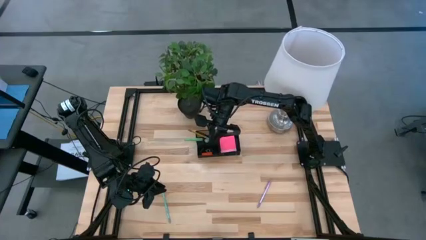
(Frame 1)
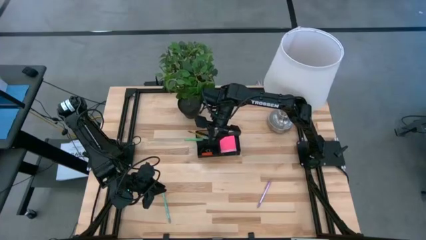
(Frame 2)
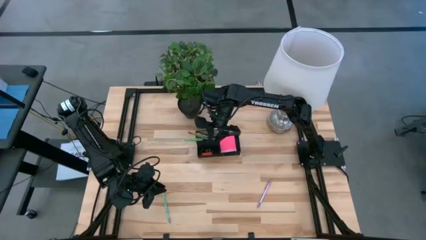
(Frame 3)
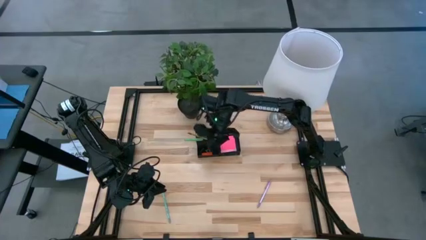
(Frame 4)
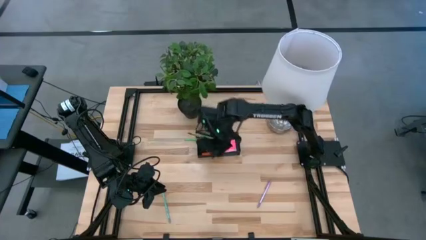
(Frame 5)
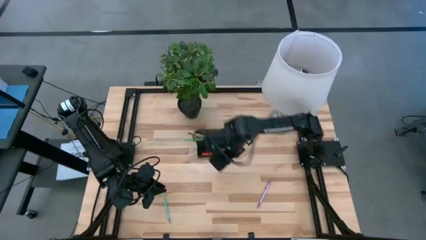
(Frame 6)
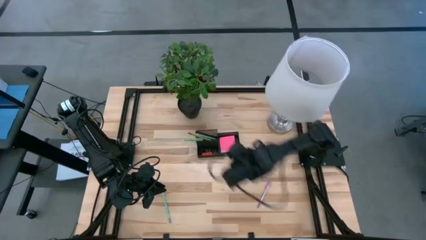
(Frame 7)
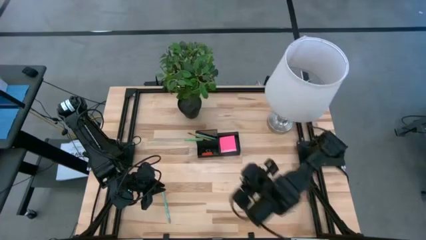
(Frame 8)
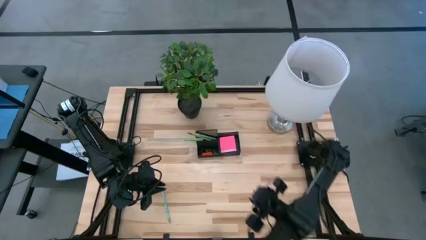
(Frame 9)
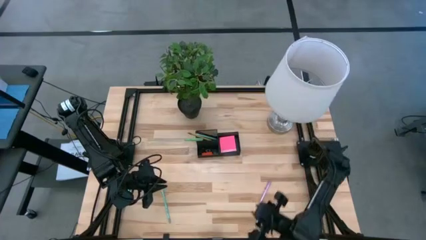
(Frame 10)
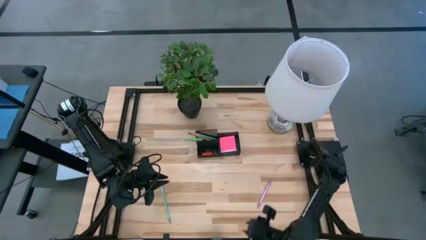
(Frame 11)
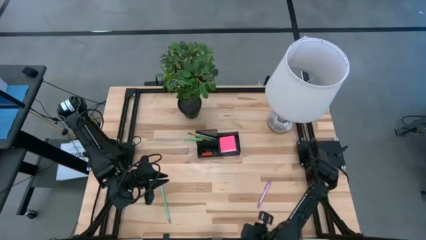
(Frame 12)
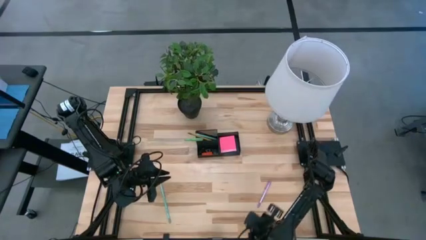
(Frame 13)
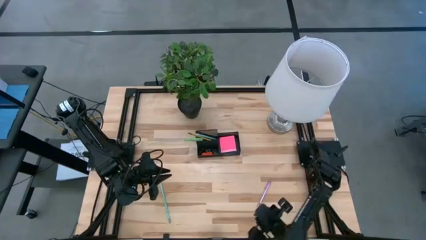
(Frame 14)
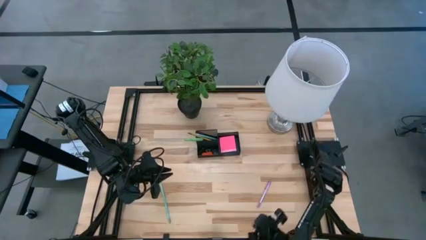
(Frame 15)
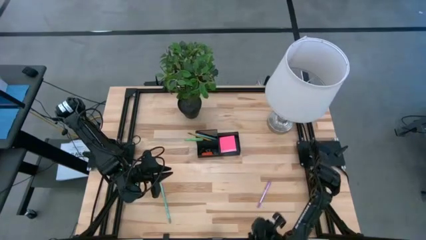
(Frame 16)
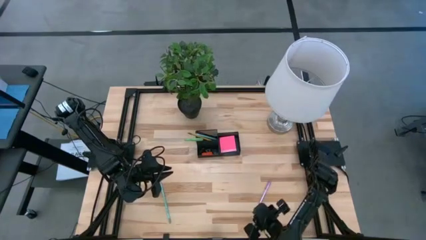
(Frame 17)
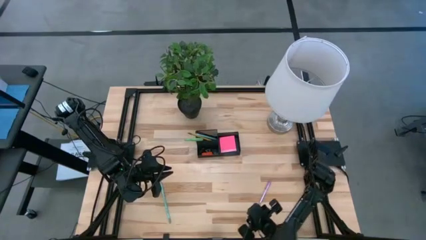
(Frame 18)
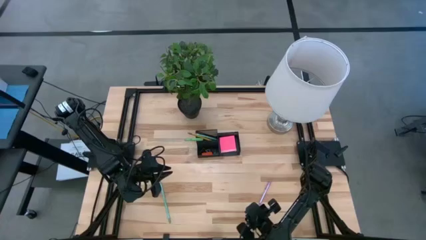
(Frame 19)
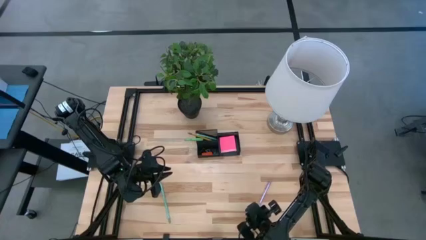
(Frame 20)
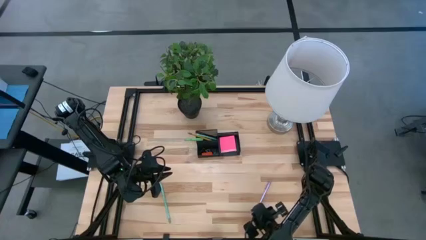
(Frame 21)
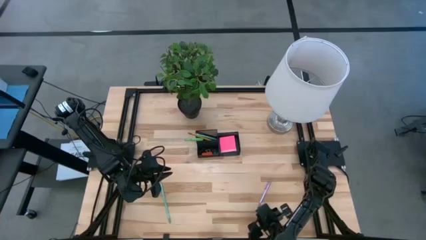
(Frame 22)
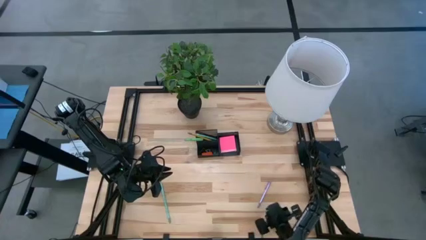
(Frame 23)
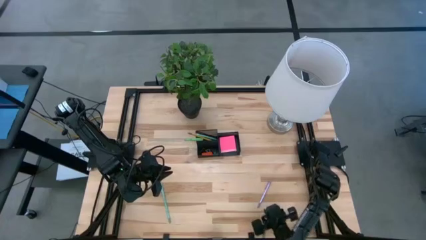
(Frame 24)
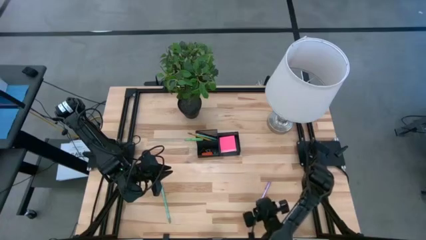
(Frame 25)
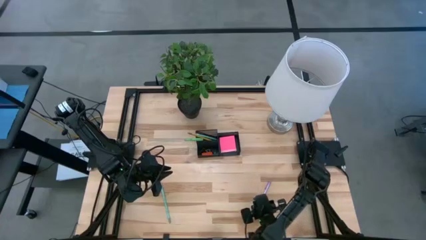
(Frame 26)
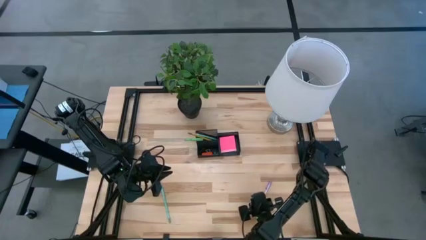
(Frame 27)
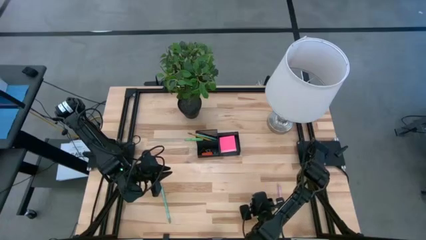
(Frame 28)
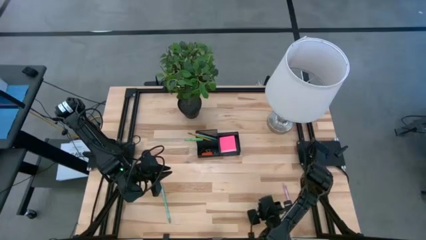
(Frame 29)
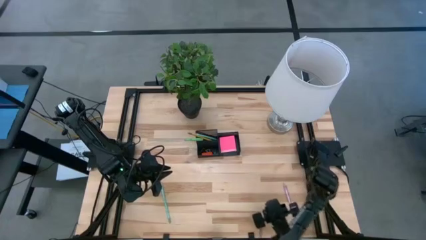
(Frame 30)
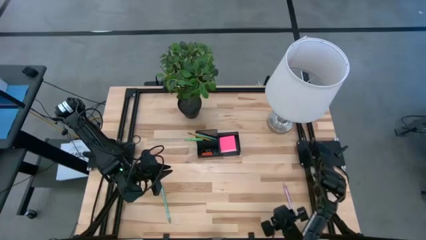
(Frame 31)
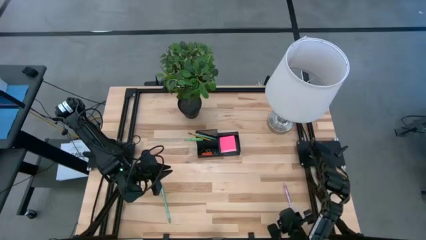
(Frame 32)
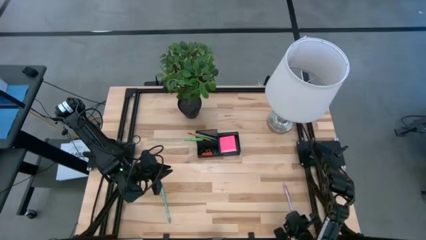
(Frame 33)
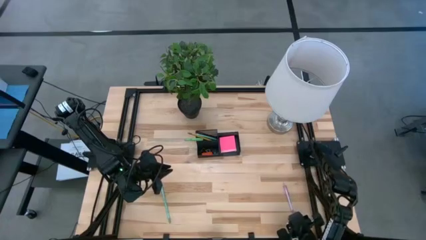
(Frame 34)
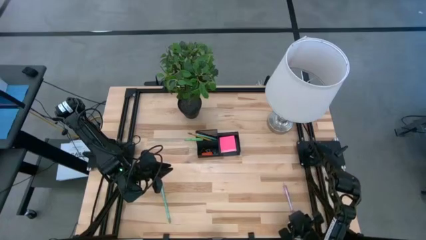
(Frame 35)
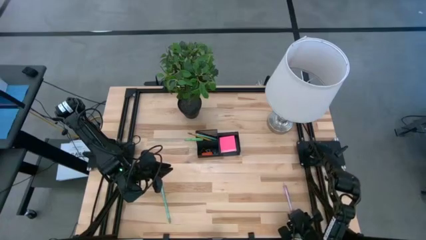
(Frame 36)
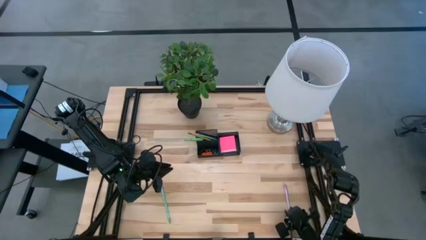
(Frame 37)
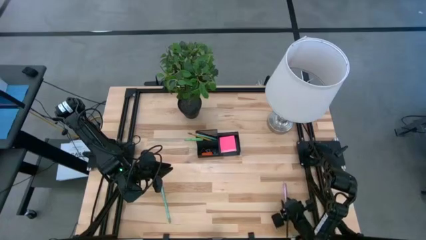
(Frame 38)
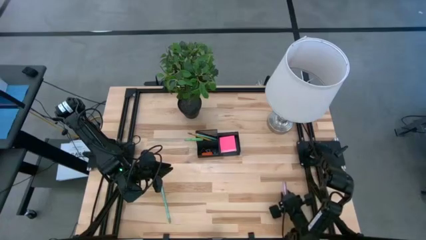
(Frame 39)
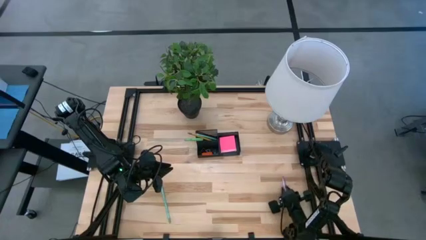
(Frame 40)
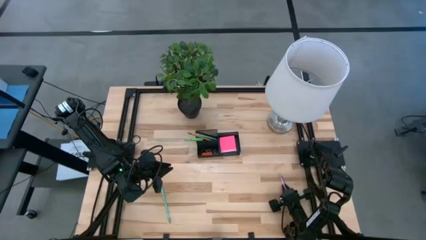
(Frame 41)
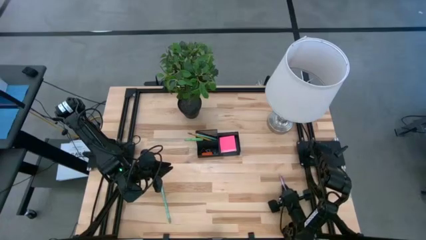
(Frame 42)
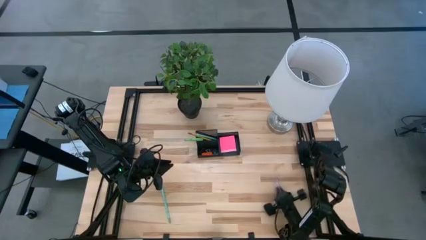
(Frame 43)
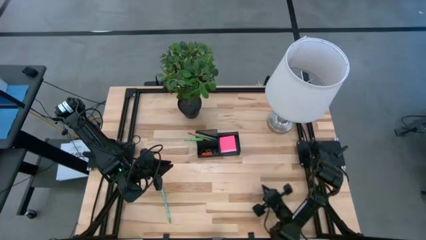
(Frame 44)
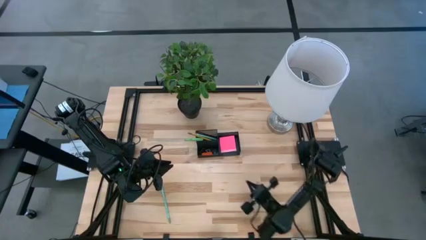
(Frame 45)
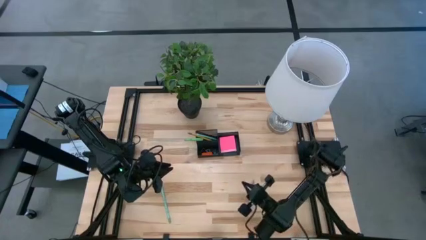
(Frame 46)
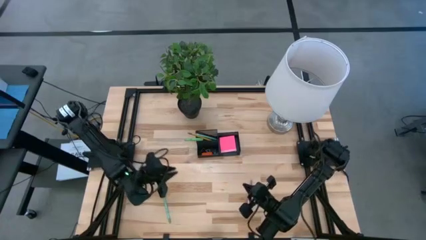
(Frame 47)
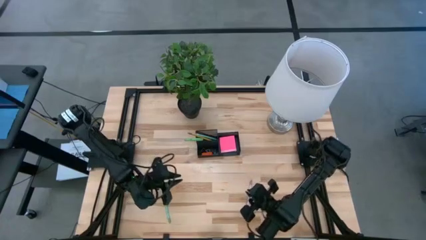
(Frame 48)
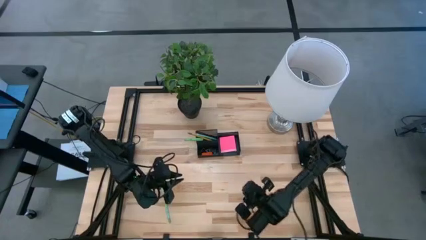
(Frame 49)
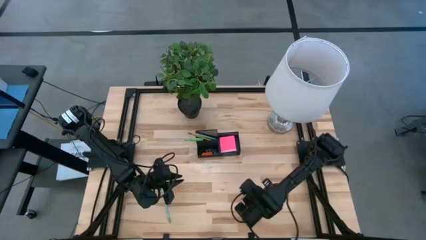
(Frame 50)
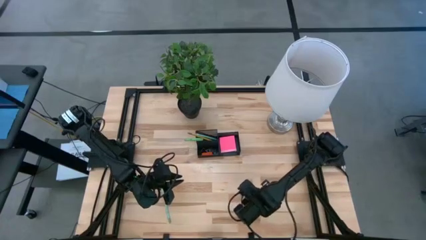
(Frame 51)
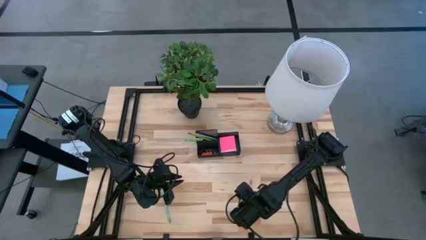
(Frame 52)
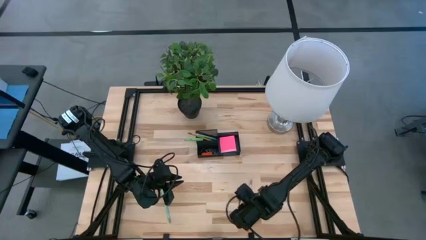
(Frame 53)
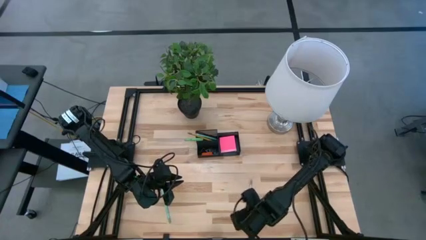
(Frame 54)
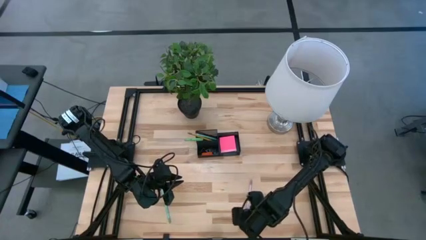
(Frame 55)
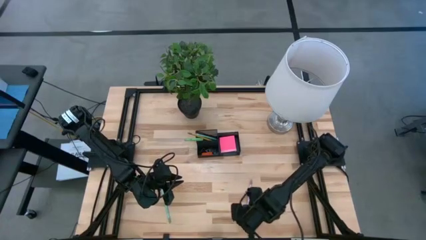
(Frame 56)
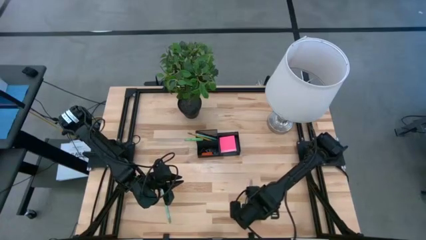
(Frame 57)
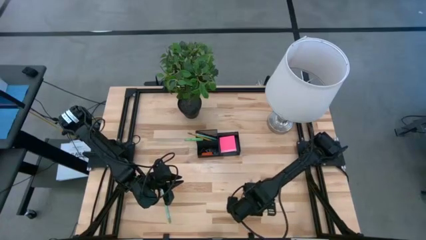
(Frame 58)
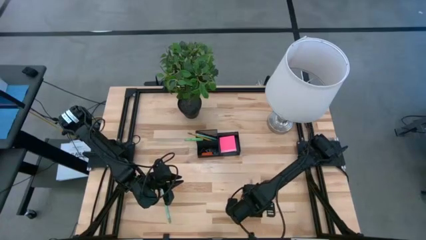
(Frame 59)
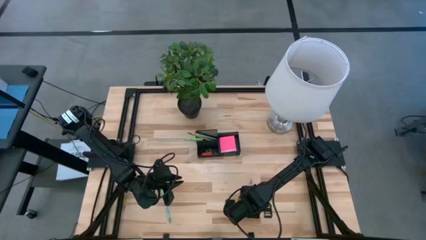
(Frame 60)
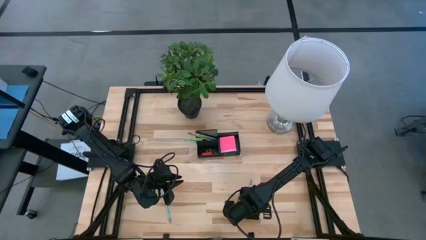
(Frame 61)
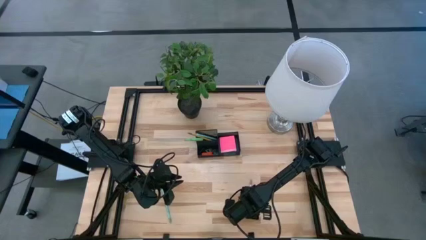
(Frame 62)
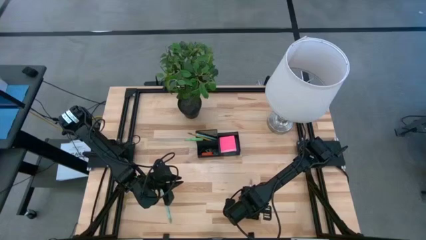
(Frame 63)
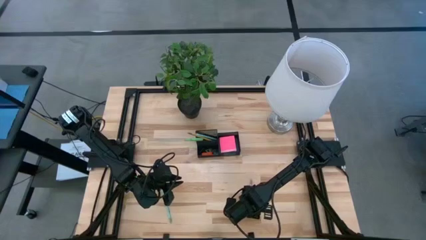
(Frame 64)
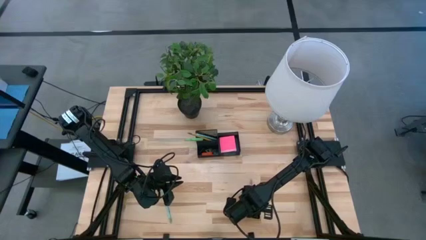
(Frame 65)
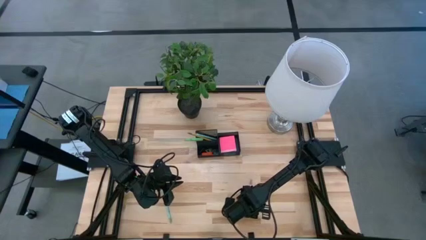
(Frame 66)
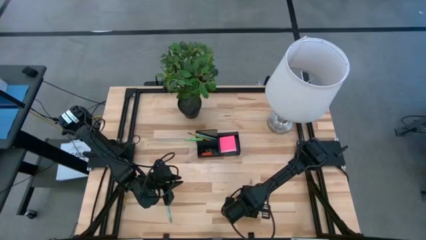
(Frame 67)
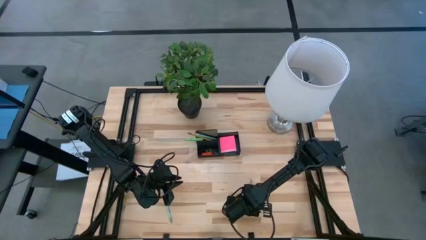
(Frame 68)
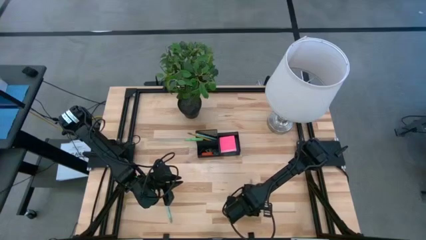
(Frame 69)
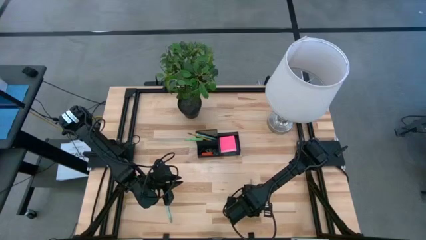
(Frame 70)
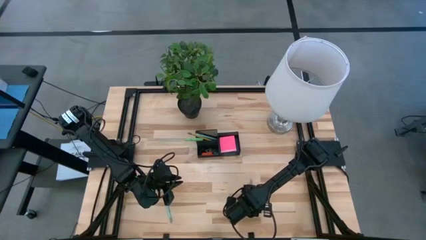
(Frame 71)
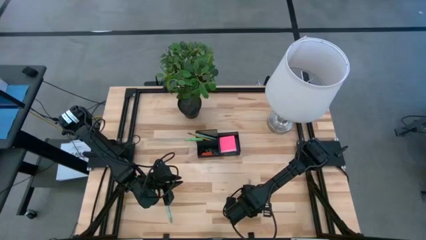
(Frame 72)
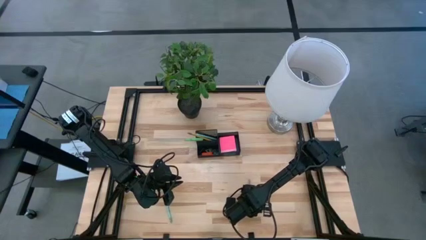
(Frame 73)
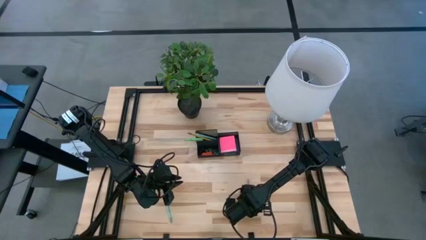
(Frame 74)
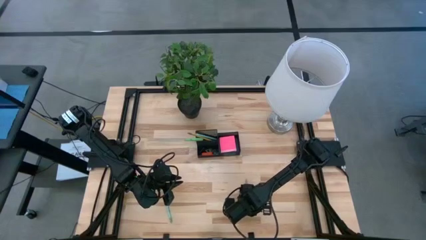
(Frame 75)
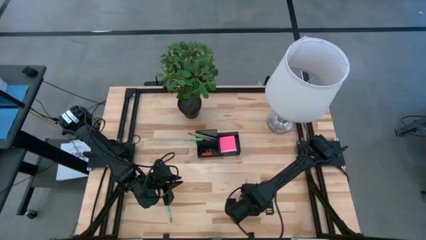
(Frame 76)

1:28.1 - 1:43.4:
Task: Pick and place office supplies into organizer
Put the purple pen into the black desk organizer
